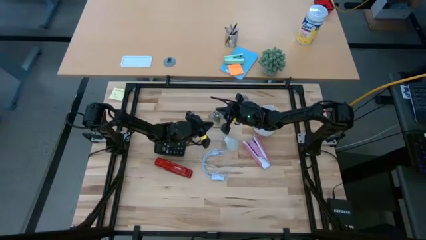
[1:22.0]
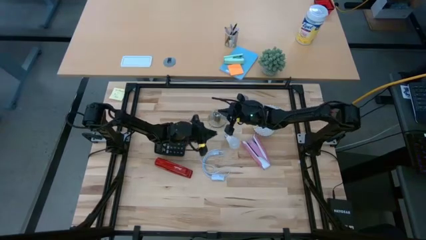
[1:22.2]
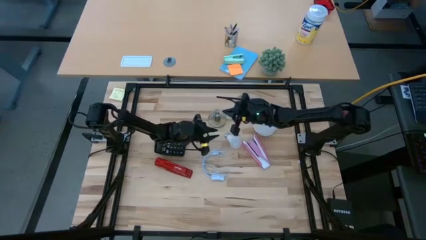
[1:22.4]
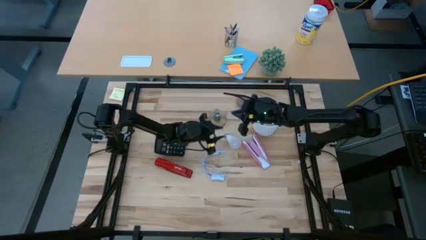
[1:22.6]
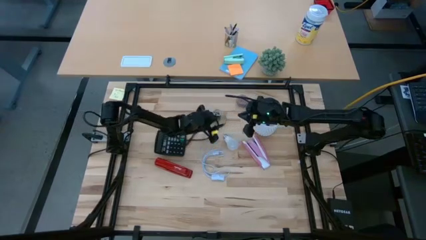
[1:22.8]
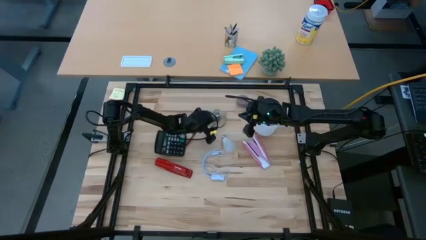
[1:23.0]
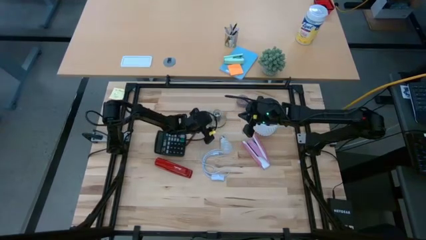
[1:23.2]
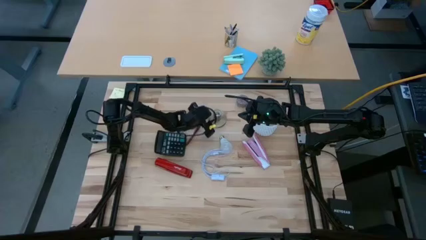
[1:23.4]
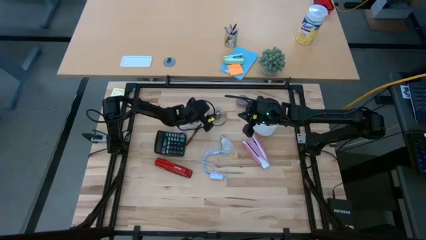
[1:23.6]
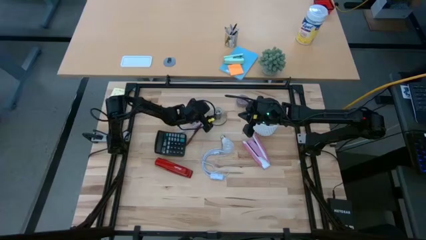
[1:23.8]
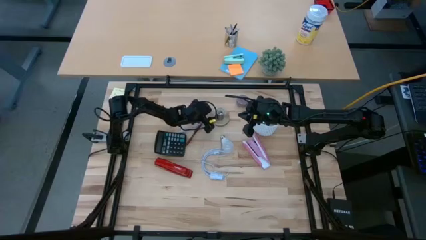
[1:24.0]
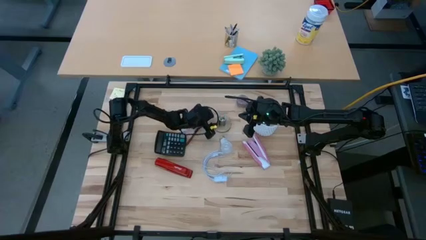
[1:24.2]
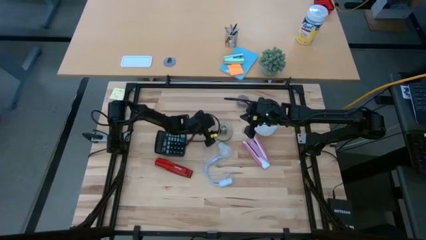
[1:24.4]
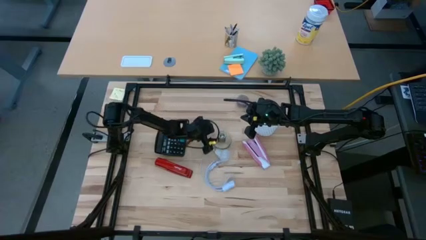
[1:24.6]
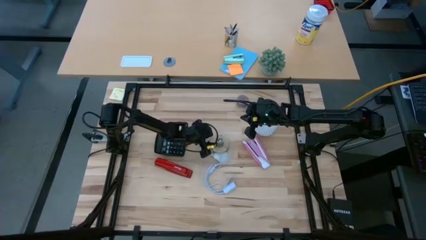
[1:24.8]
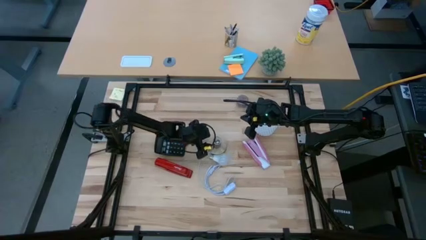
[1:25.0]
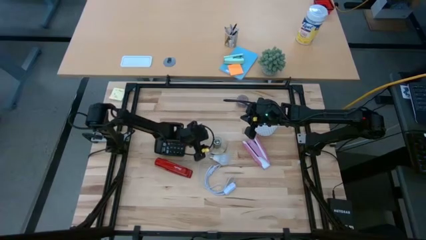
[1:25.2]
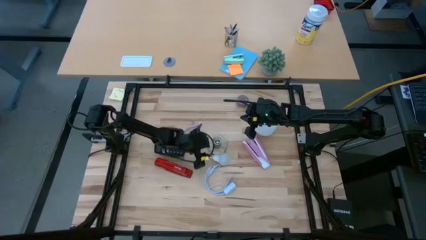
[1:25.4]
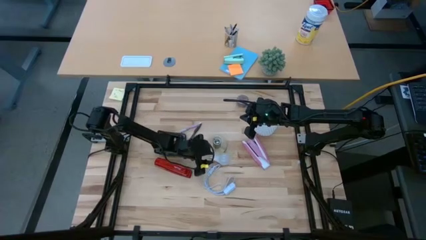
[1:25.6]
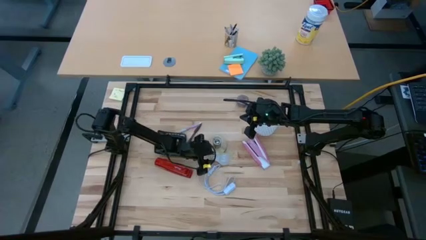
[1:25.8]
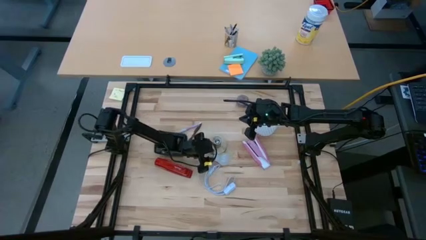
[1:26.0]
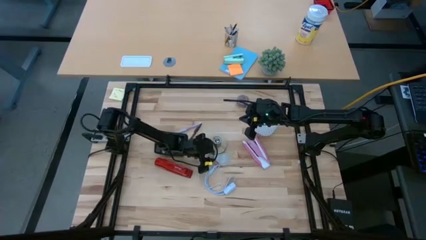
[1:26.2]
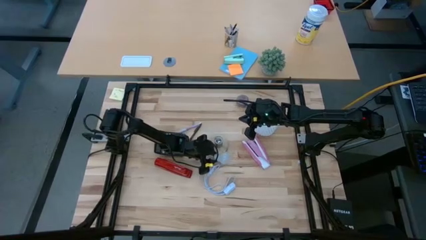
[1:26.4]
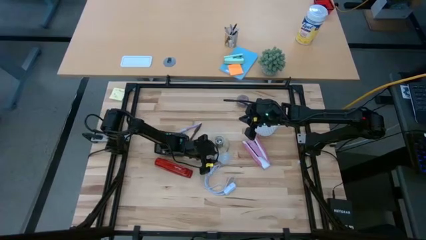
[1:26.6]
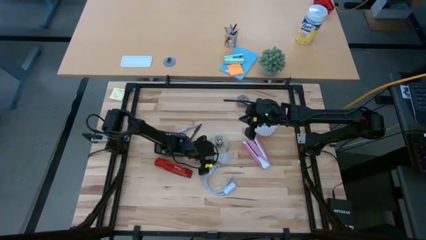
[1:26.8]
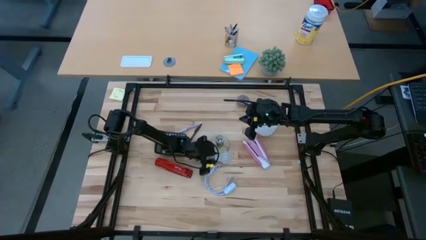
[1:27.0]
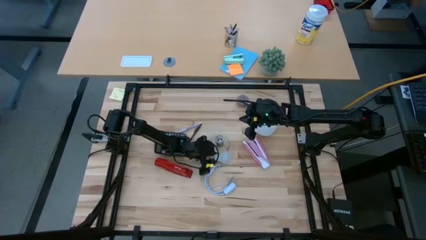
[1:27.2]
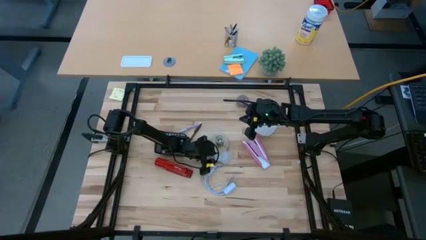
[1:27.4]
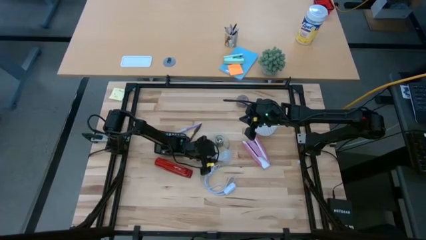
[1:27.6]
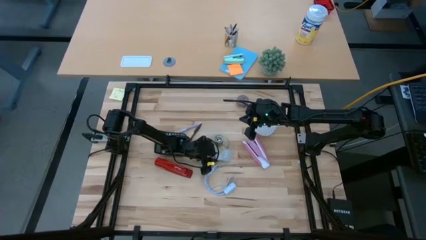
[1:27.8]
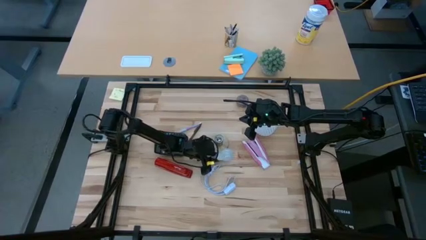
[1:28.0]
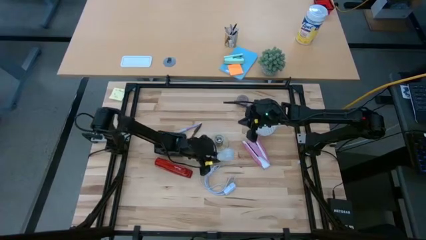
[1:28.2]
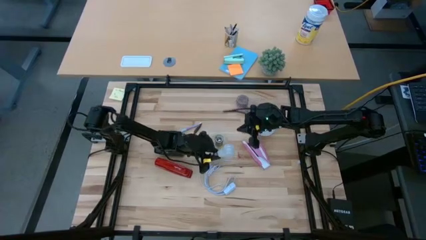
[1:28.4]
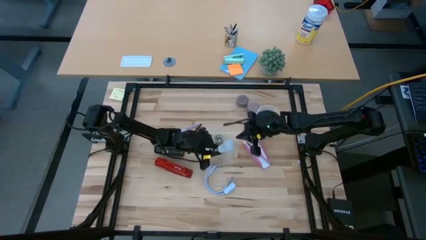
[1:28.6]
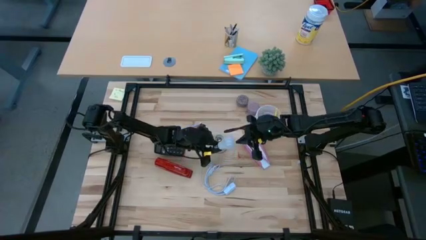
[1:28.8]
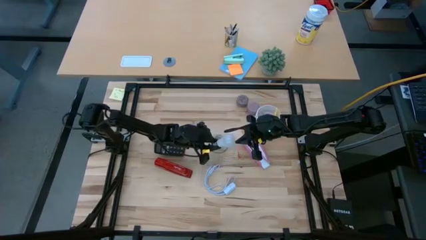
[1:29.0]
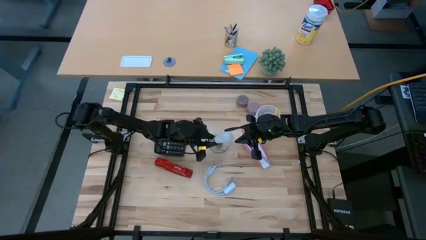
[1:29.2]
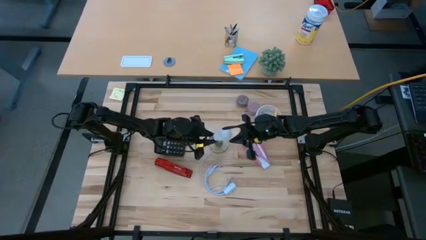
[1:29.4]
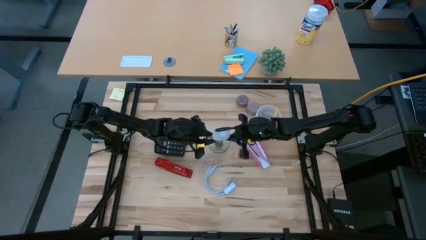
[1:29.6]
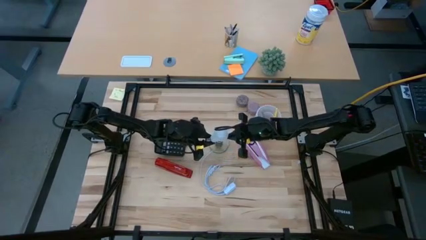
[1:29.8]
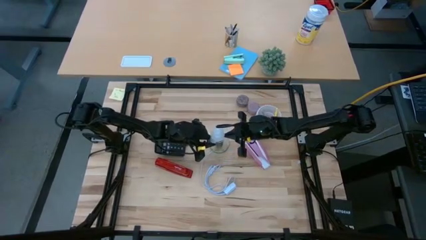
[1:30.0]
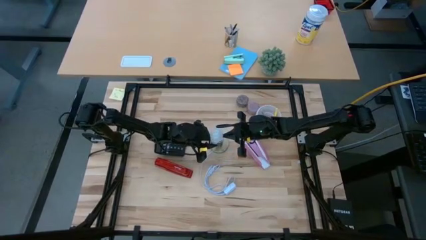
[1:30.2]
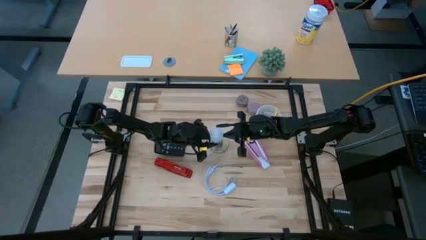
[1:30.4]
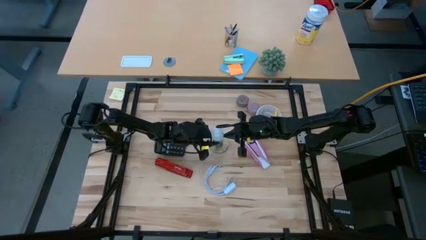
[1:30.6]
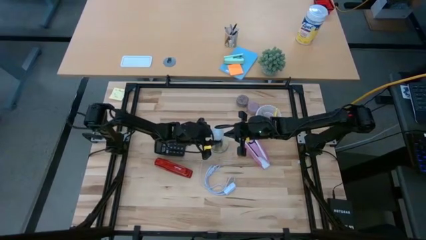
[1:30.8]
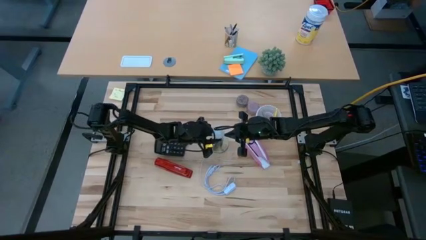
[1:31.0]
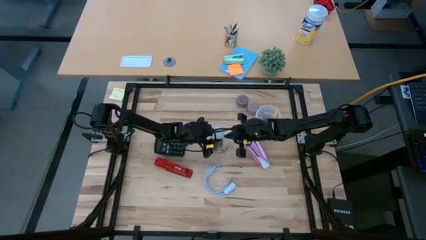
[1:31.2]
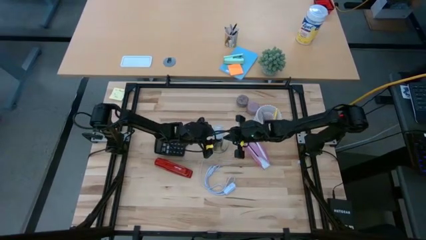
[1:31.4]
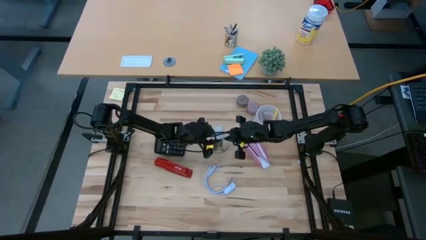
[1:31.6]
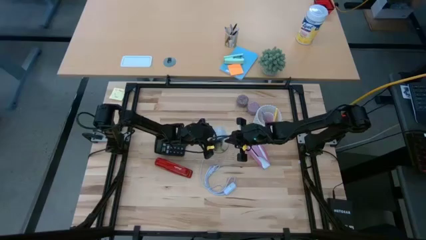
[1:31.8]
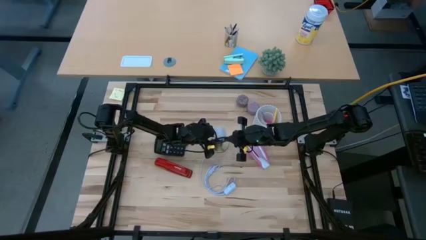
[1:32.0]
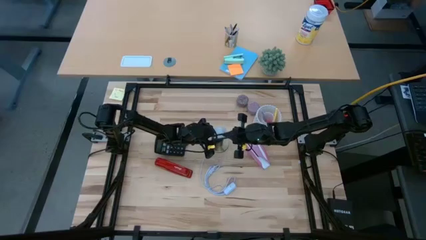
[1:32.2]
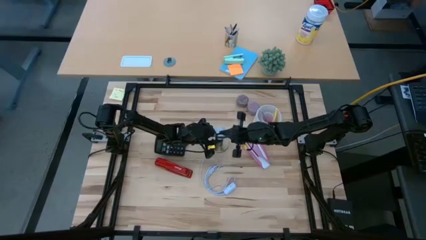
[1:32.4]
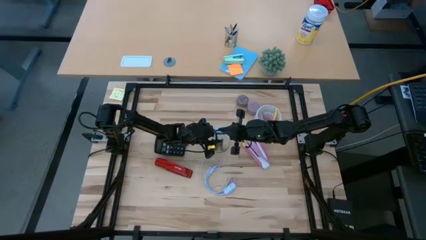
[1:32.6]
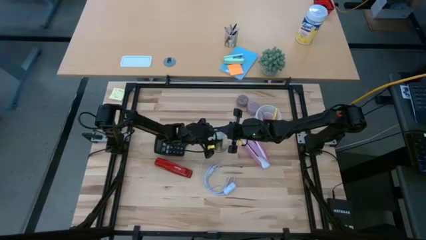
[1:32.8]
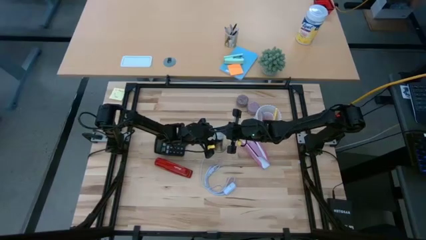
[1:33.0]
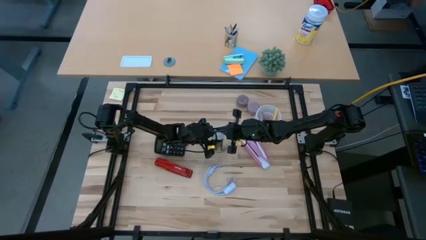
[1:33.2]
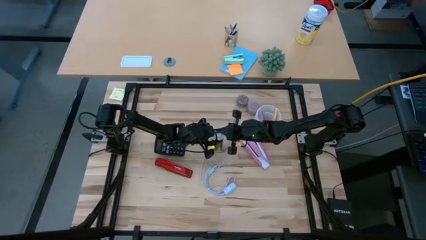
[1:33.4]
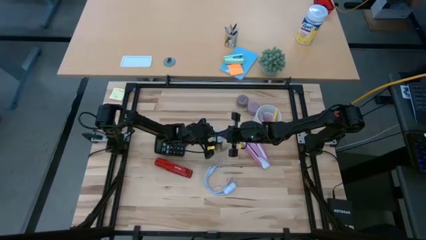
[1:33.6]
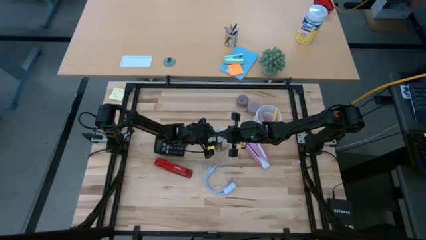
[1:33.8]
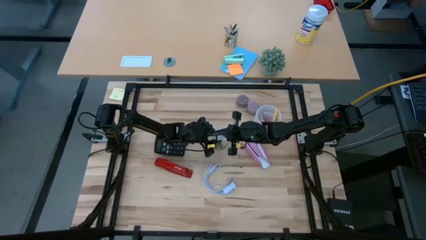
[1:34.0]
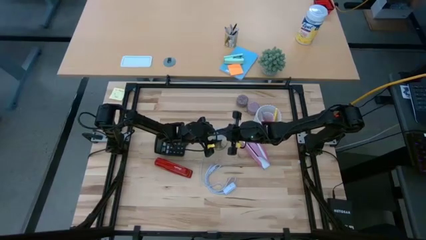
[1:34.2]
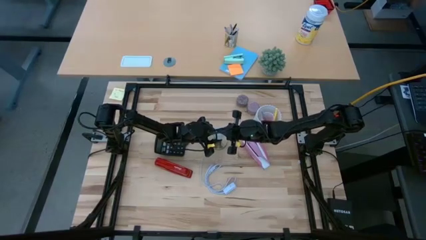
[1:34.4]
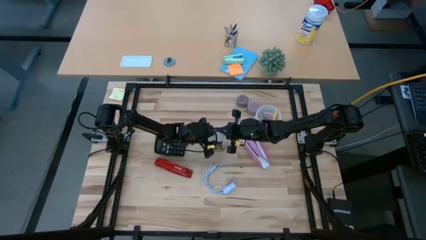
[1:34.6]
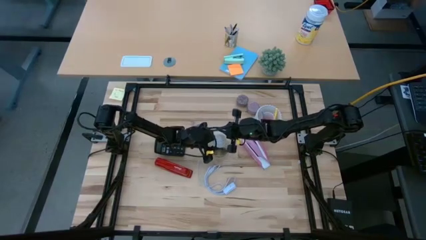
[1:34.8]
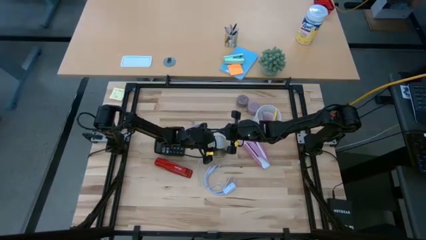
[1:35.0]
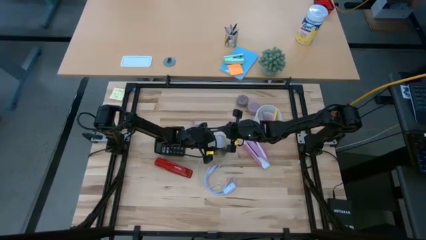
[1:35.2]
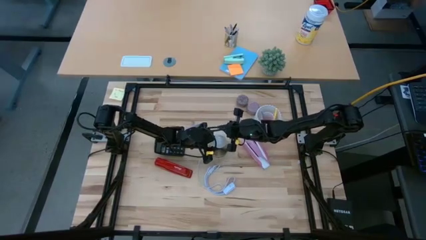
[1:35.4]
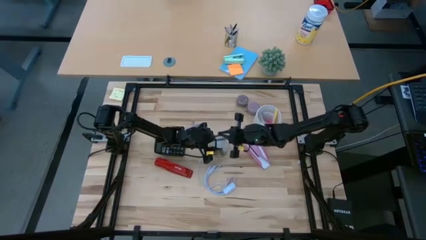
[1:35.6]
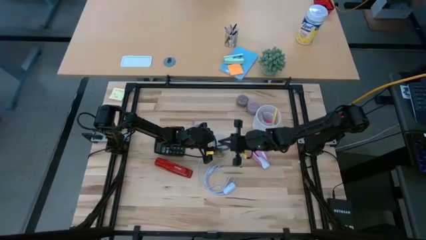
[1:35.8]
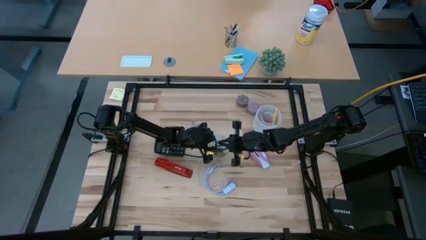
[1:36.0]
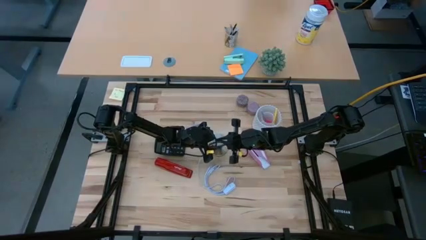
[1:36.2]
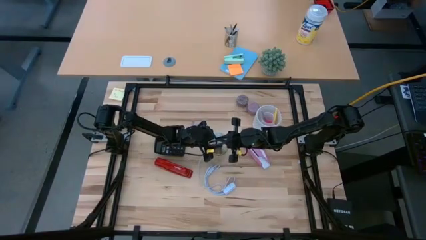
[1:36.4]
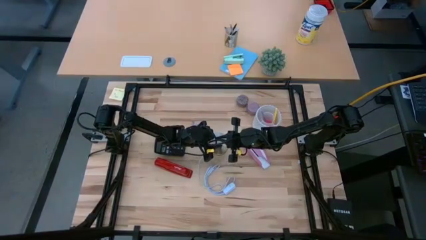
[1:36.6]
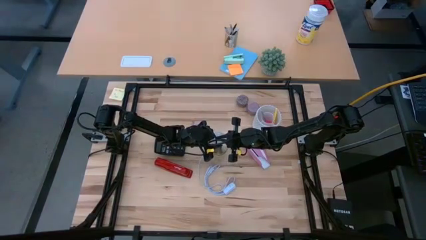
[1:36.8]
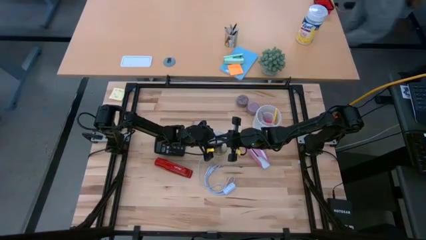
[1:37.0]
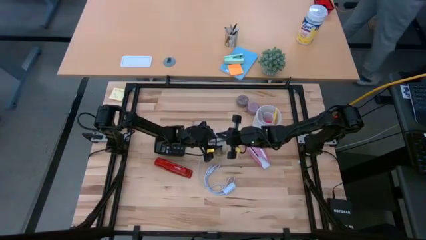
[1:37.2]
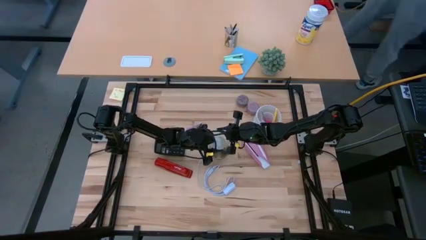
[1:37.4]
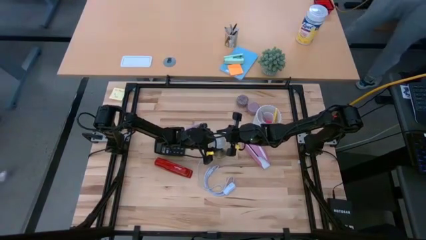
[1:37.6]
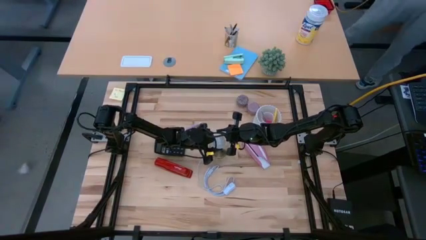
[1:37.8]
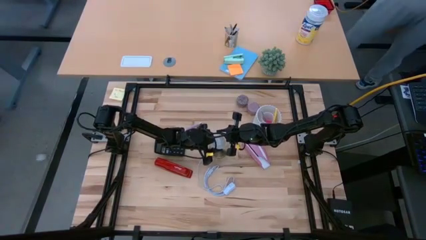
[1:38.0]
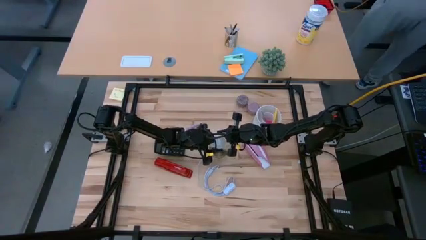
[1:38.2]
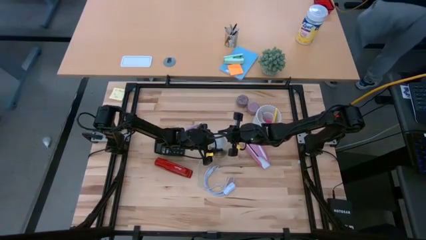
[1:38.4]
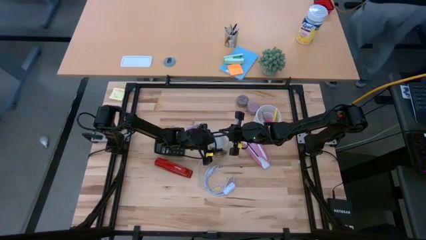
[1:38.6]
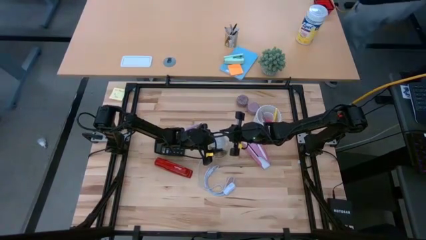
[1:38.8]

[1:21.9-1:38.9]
Task: Screw lightbulb
Insert the white lightbulb into the golden lamp
